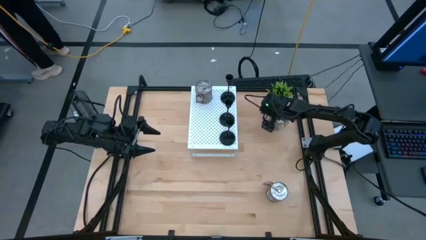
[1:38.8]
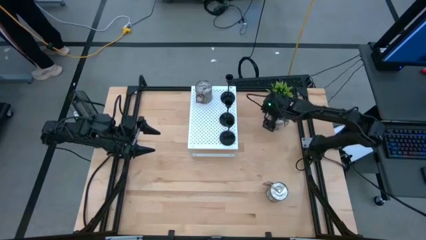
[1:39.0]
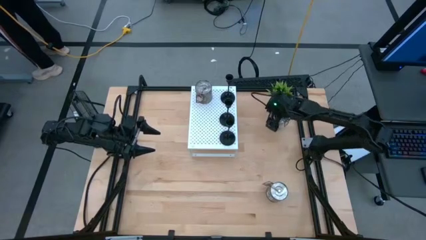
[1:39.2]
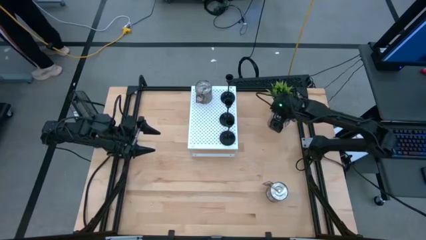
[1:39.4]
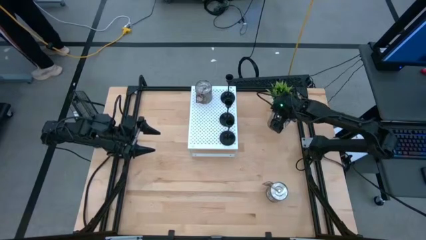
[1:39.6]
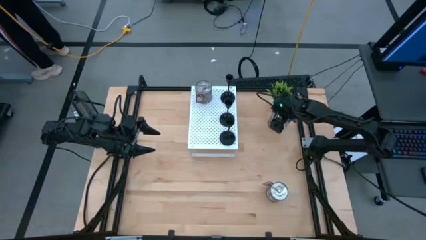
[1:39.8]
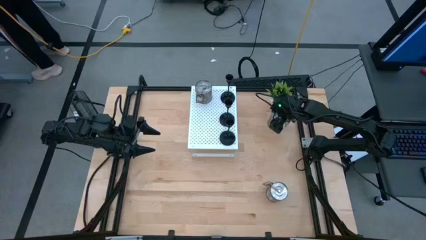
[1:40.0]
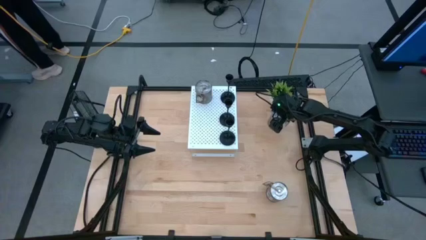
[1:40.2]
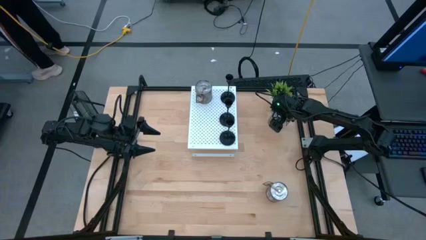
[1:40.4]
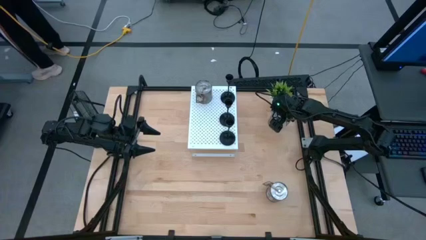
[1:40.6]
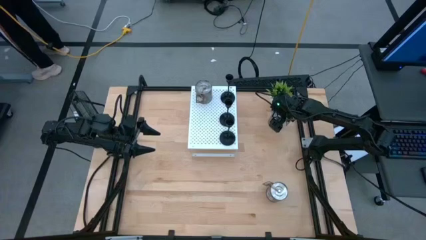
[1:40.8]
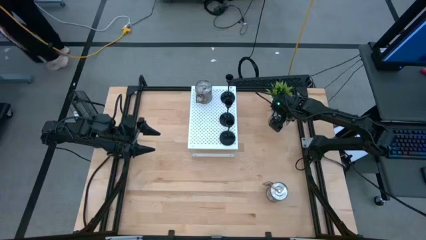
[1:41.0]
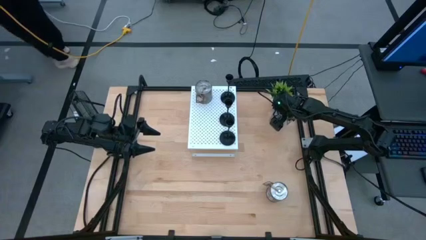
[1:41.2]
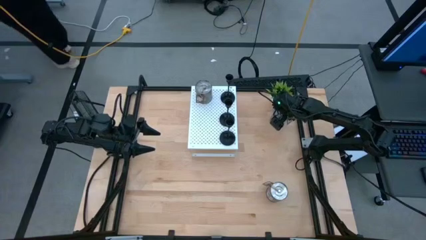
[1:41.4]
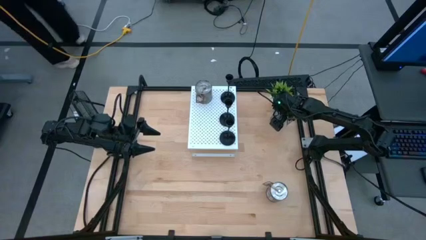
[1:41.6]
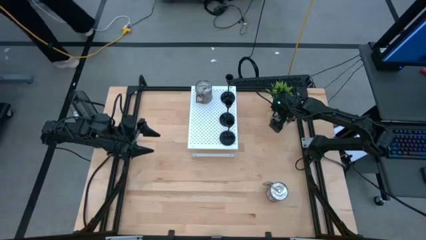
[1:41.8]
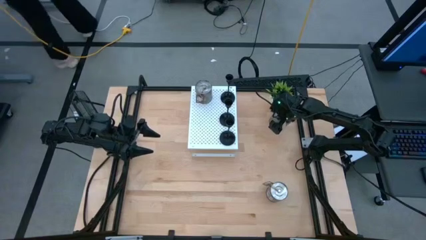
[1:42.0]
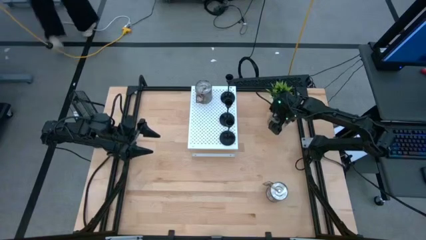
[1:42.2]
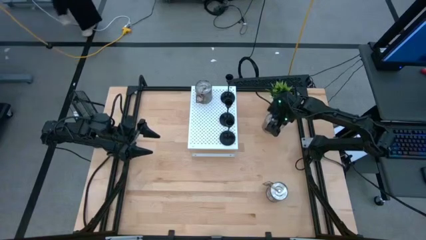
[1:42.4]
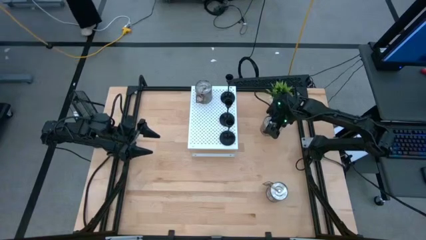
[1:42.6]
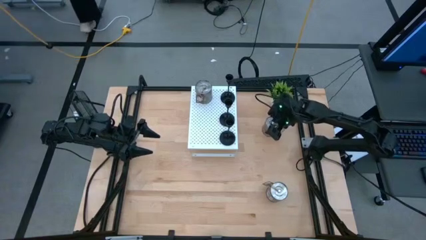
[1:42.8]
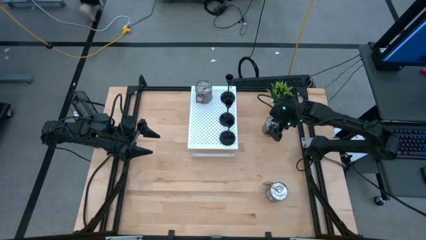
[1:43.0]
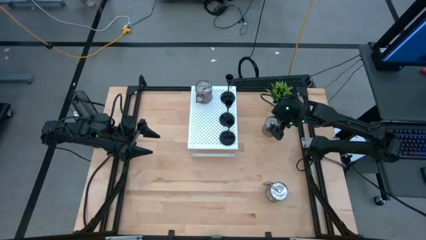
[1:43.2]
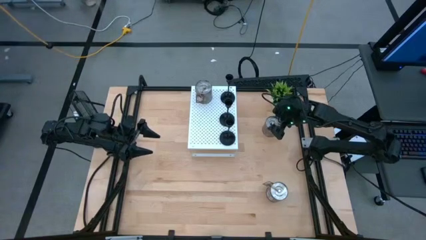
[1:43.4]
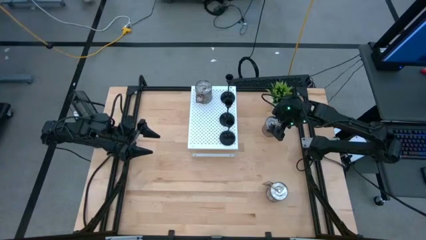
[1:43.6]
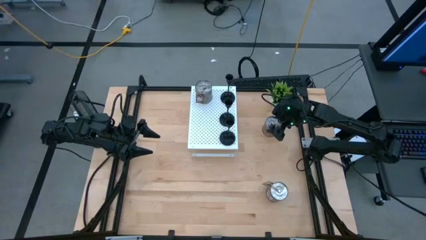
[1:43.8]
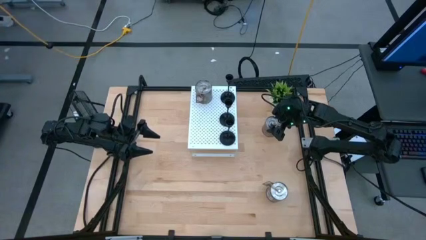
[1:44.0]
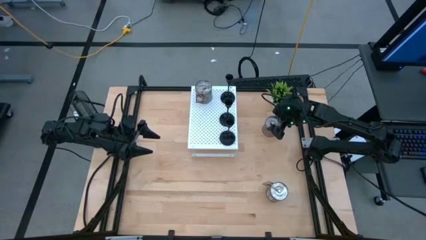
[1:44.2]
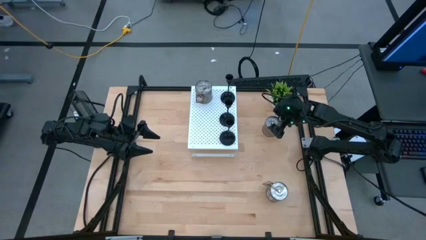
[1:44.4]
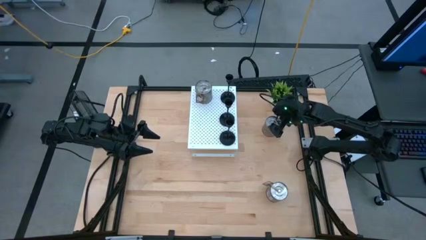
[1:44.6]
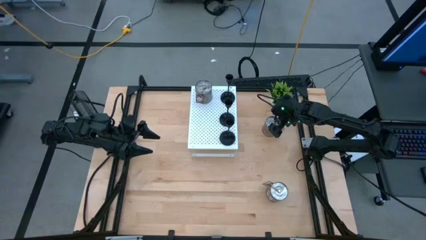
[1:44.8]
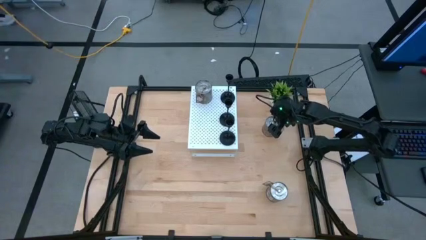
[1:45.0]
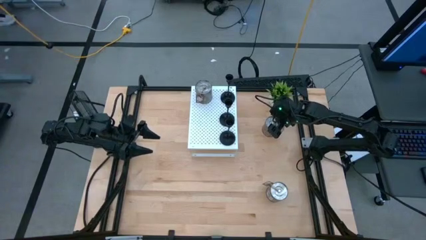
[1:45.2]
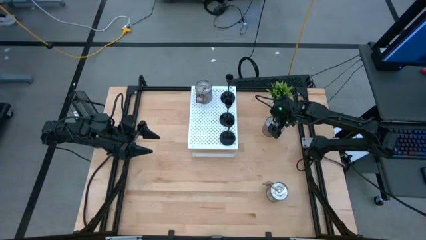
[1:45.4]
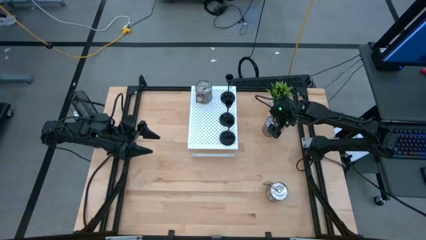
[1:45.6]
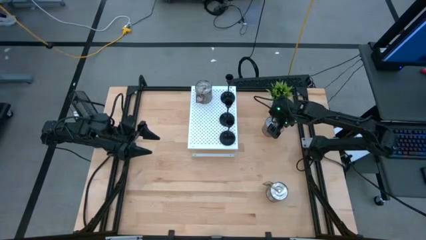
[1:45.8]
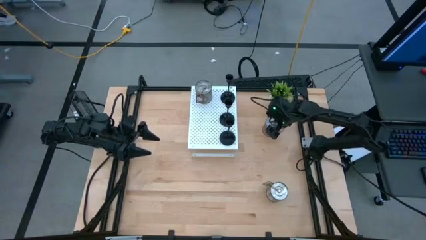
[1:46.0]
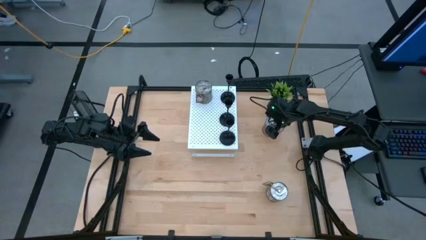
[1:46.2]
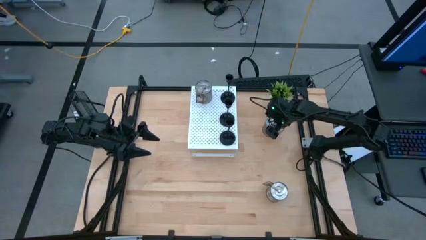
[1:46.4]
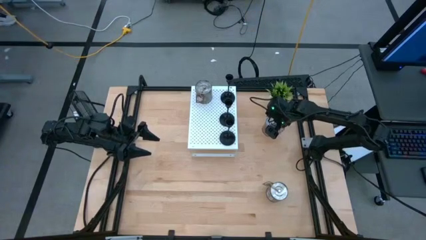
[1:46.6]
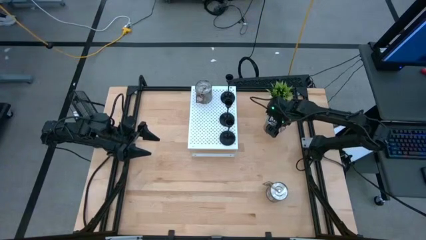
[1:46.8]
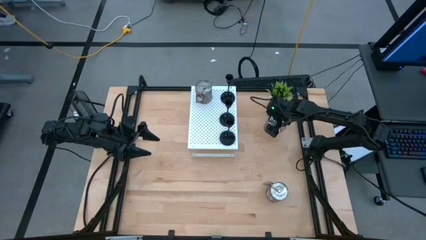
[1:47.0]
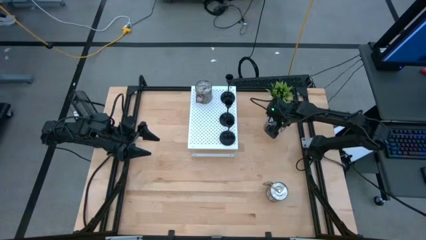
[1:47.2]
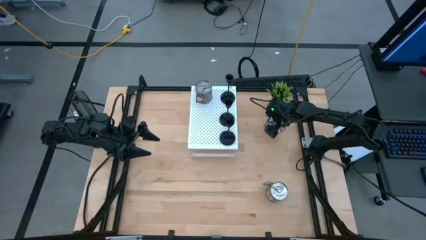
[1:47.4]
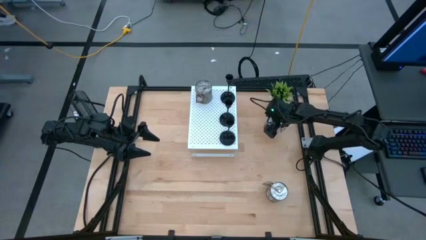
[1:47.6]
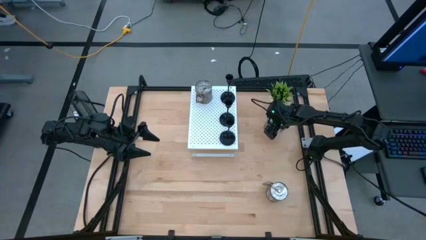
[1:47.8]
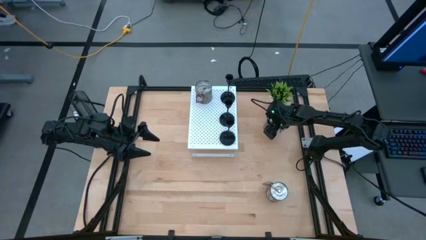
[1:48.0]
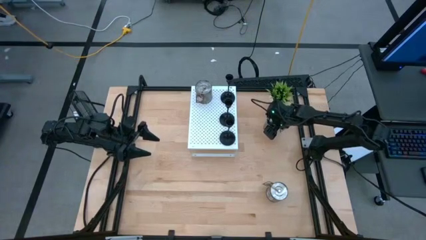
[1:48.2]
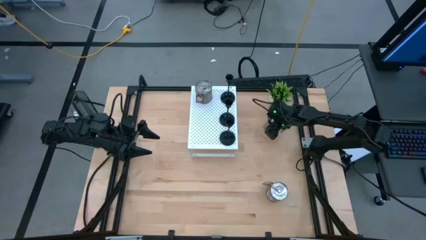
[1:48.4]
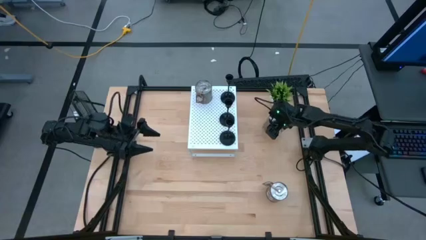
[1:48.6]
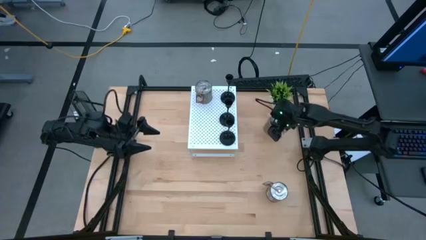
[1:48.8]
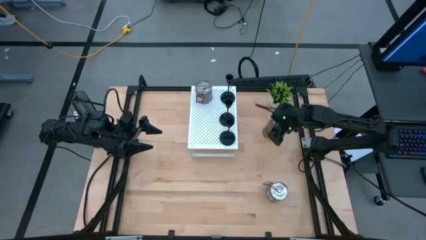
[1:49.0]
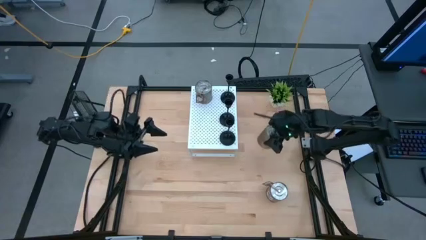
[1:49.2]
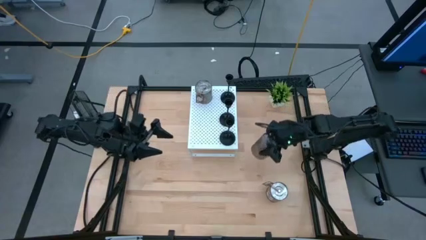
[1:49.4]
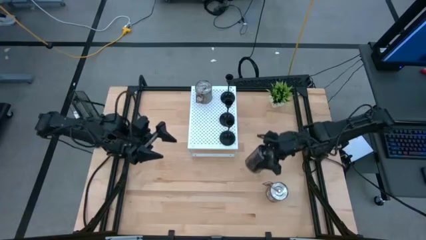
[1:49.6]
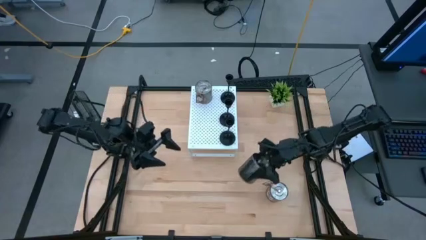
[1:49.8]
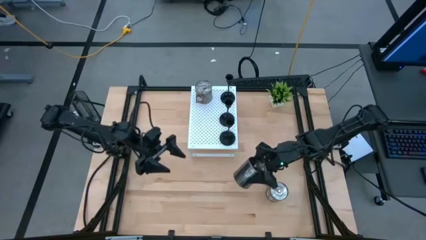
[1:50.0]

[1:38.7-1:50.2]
Task: Pick & Place candle stick holders
Put the top brown scented candle on the shelf aligned with the brown scented candle

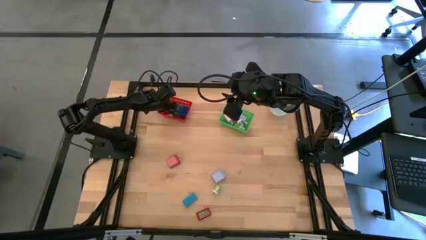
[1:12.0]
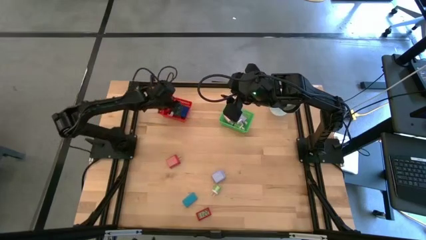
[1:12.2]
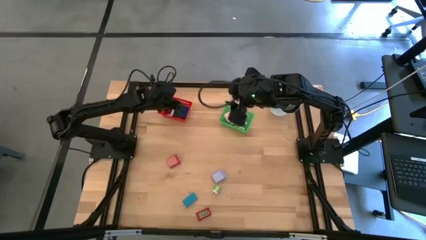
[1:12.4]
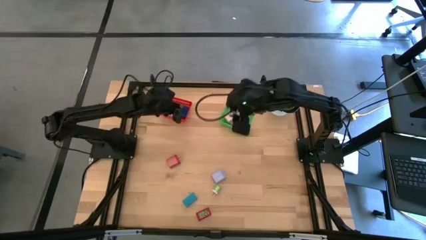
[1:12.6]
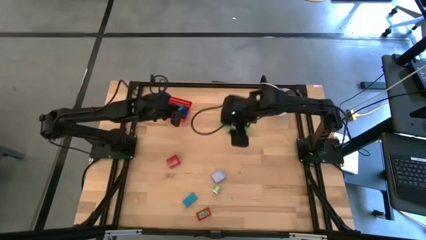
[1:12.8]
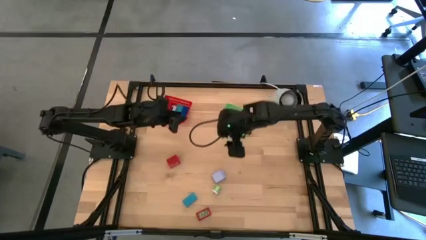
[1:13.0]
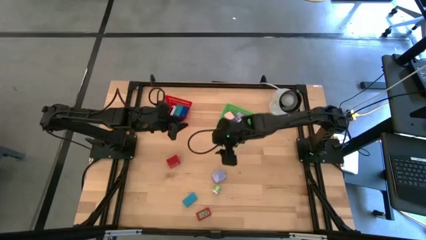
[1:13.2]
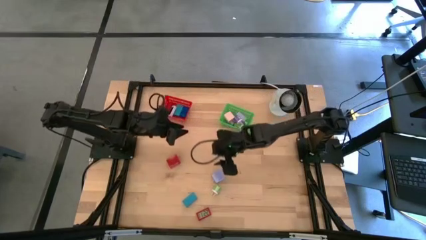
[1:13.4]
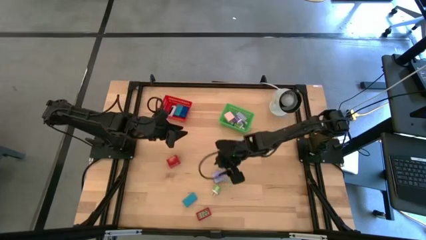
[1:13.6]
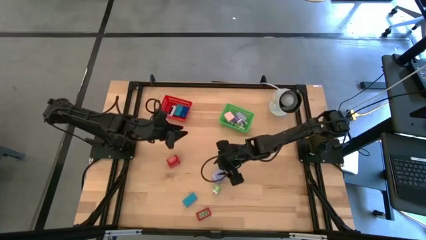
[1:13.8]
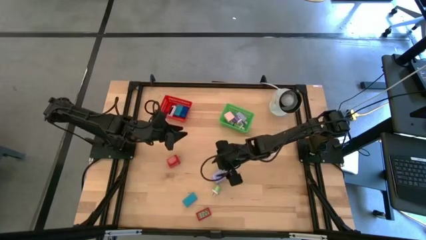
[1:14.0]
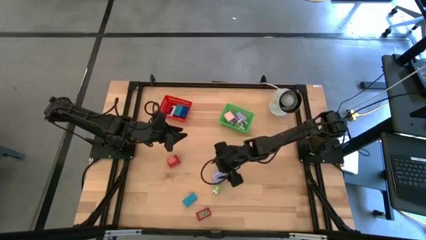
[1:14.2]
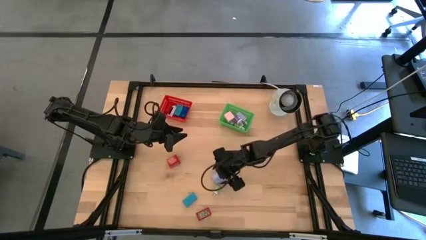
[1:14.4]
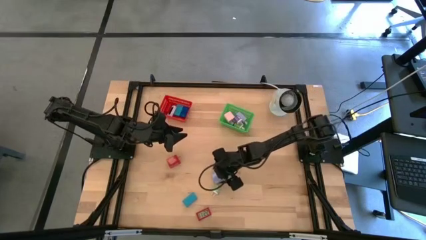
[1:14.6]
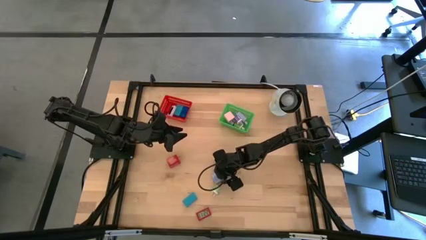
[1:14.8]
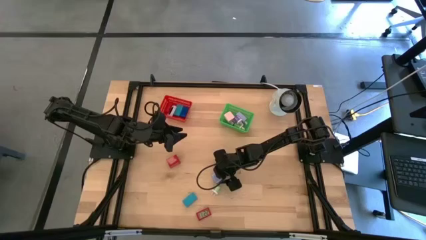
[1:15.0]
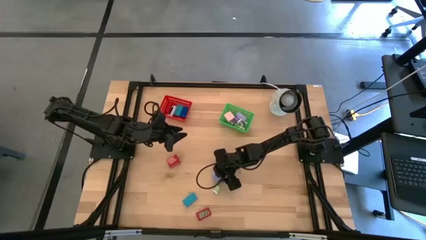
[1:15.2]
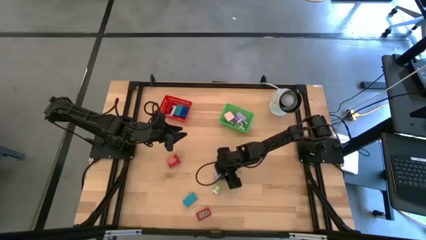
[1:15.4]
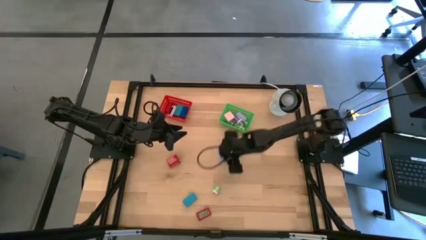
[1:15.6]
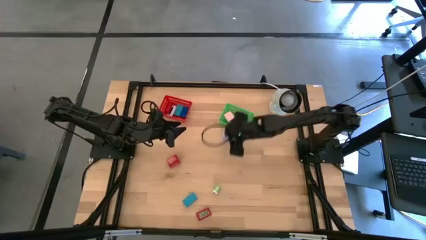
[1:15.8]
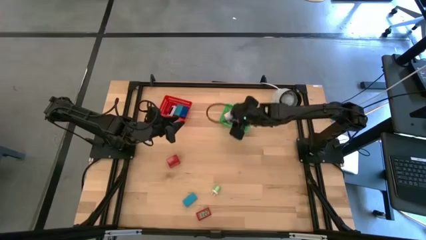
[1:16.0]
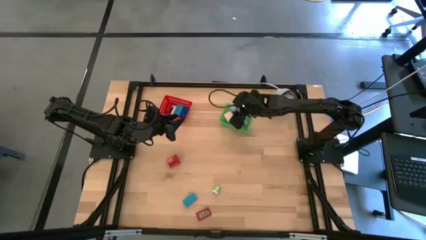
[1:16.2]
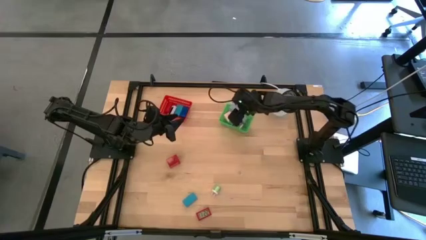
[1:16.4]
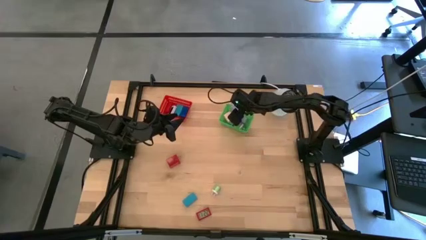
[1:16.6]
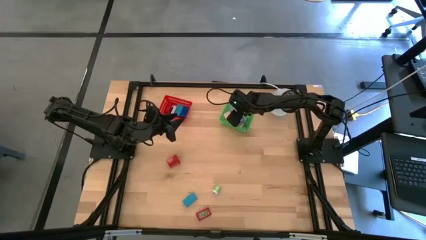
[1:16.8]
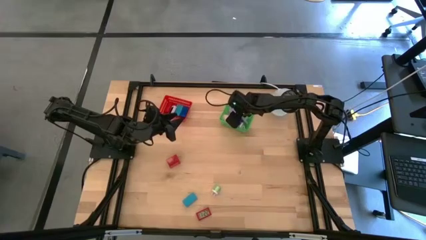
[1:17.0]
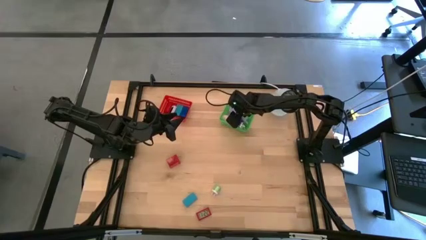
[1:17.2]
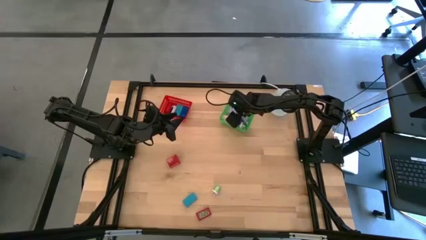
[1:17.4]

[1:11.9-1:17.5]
Task: Pick & Place Office items
Put the light violet charger adapter into the green bin

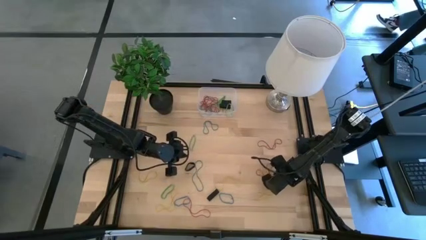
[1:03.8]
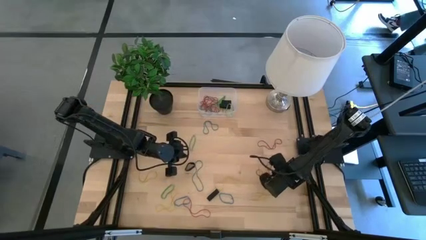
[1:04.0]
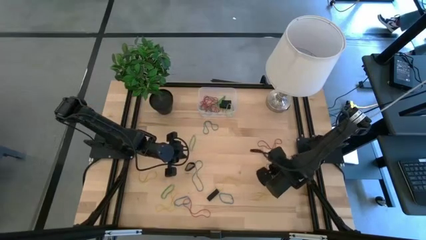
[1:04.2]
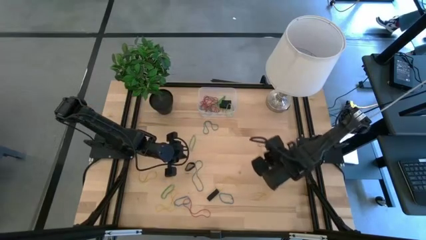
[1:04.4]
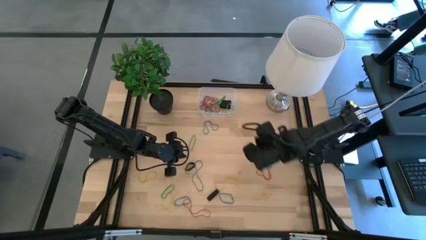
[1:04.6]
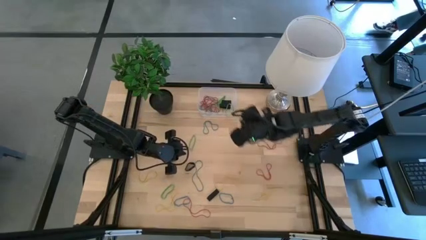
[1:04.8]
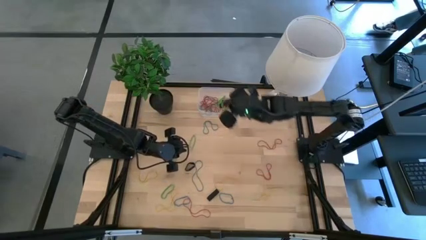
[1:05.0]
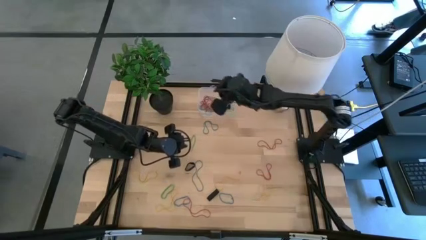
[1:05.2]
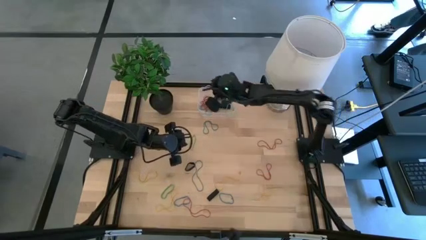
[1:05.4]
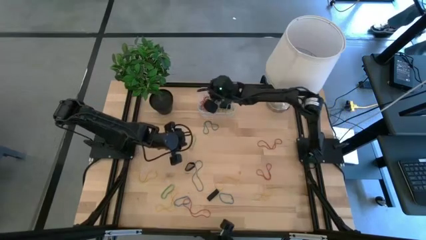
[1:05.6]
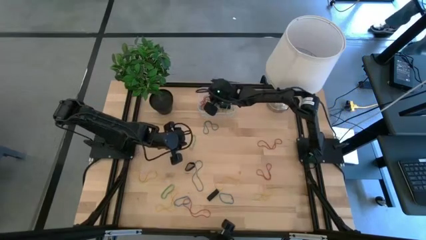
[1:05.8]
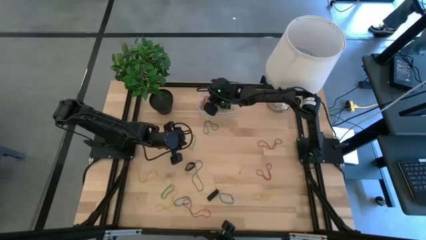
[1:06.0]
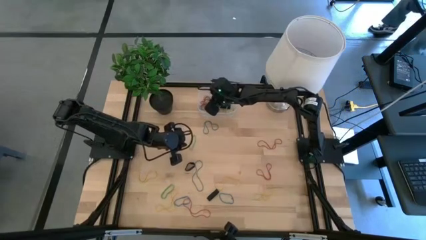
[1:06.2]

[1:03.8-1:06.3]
Task: Pick and place rubber bands into bin
Put the yellow rubber band into the transparent bin
